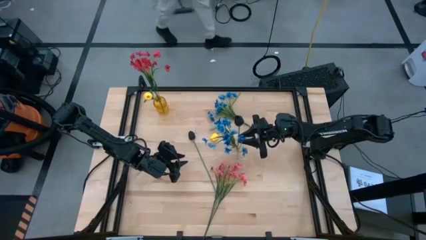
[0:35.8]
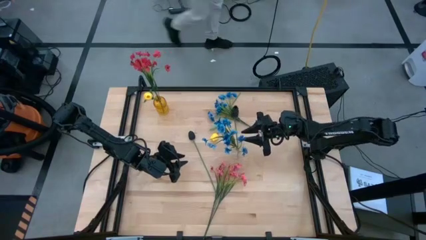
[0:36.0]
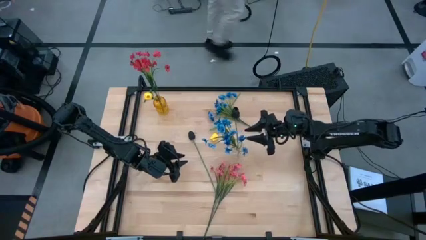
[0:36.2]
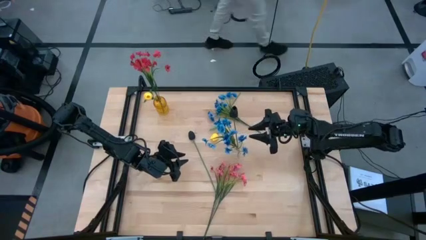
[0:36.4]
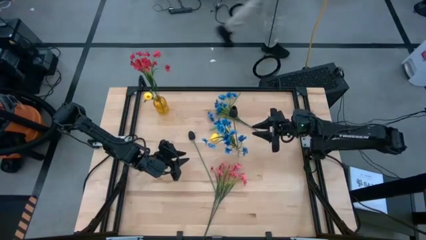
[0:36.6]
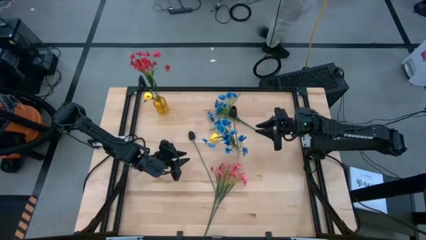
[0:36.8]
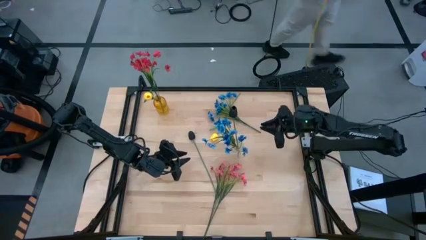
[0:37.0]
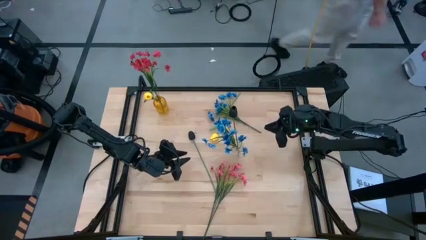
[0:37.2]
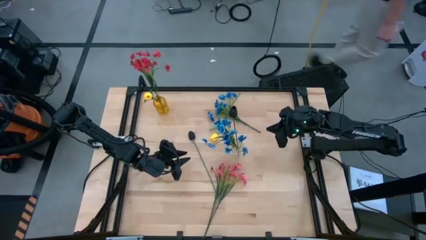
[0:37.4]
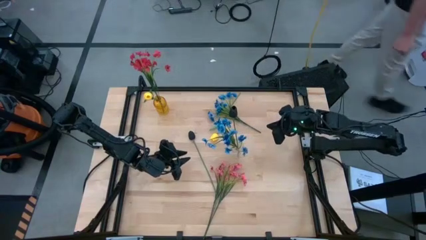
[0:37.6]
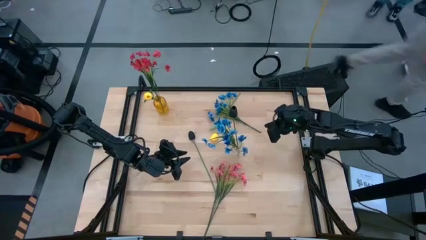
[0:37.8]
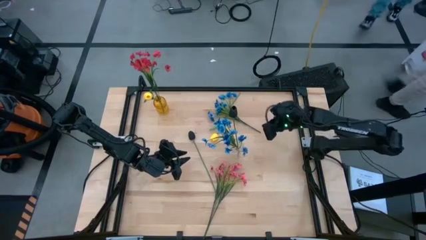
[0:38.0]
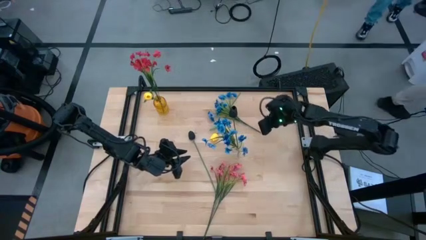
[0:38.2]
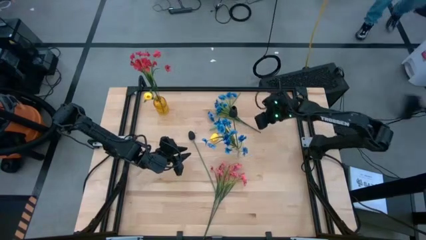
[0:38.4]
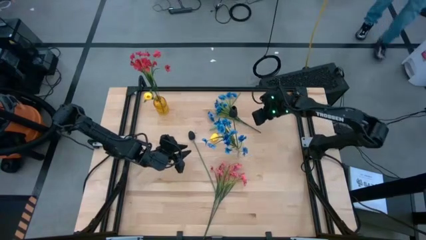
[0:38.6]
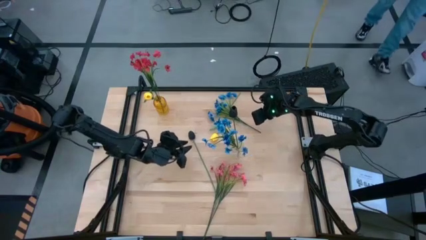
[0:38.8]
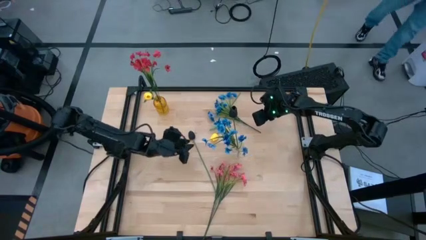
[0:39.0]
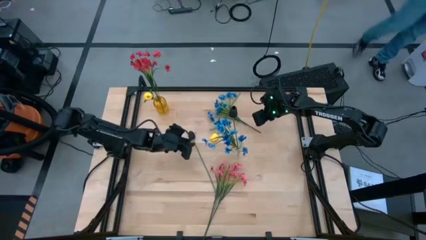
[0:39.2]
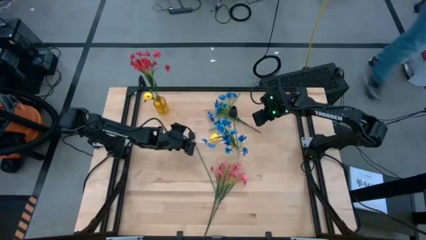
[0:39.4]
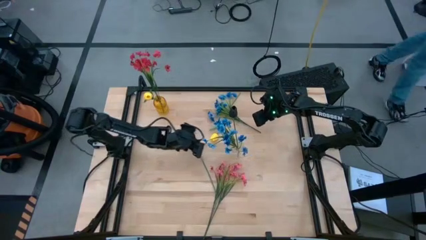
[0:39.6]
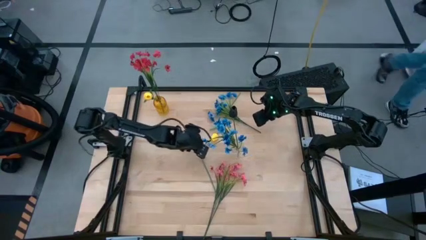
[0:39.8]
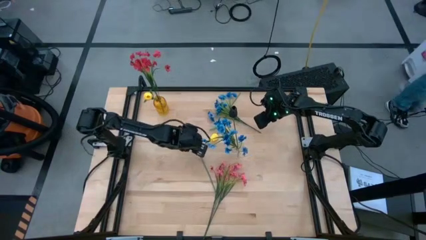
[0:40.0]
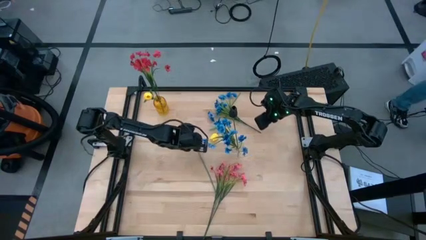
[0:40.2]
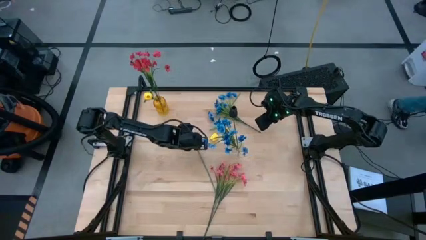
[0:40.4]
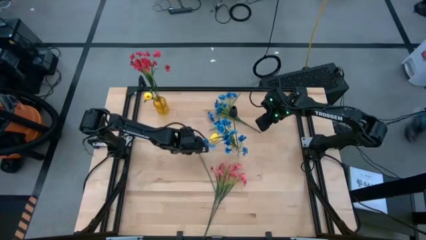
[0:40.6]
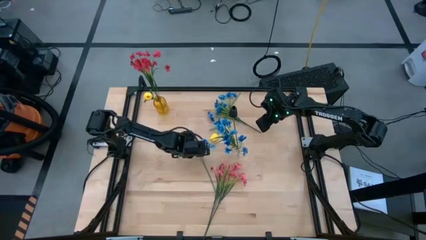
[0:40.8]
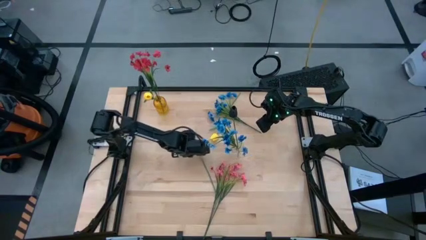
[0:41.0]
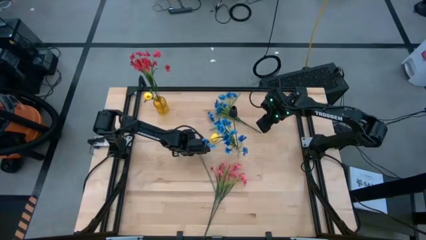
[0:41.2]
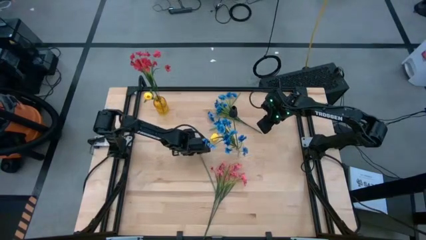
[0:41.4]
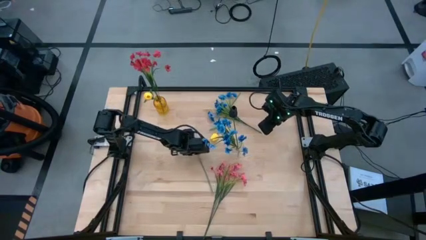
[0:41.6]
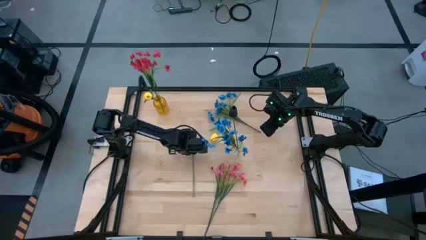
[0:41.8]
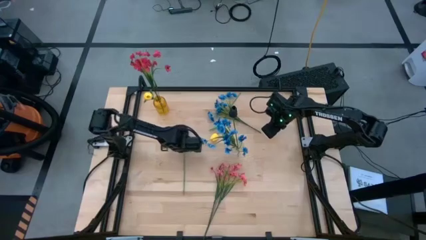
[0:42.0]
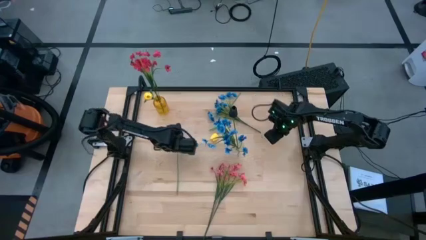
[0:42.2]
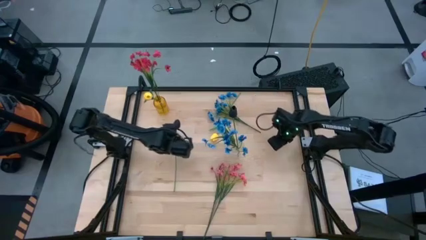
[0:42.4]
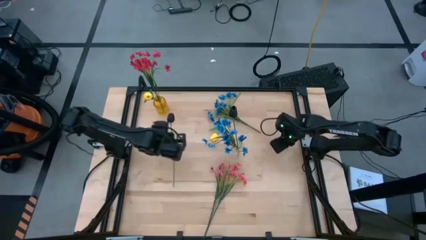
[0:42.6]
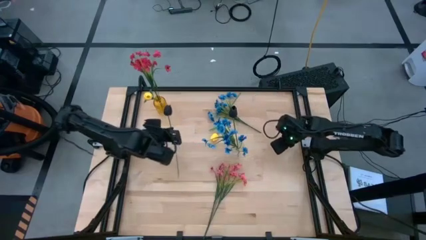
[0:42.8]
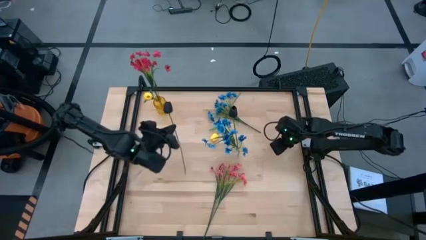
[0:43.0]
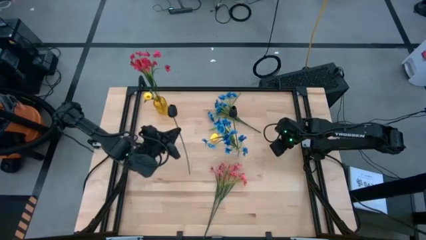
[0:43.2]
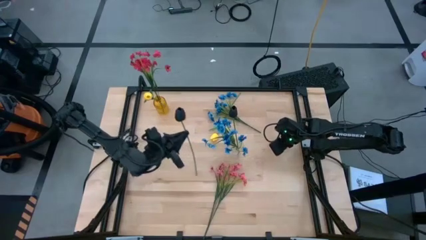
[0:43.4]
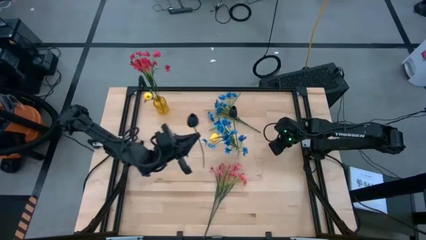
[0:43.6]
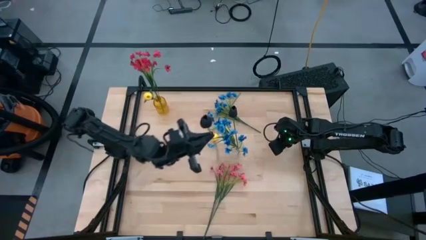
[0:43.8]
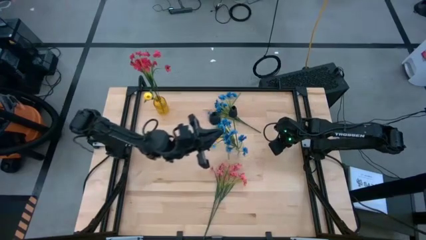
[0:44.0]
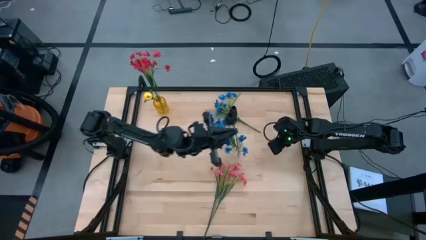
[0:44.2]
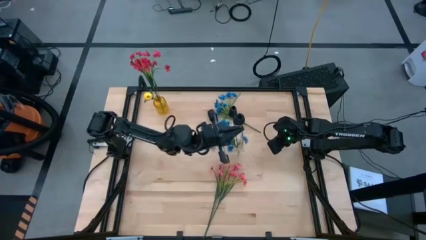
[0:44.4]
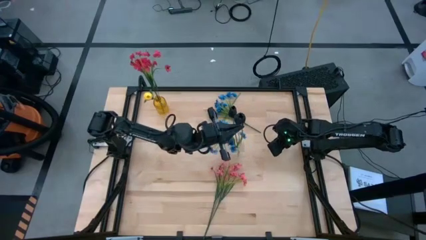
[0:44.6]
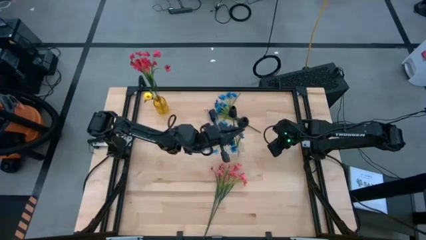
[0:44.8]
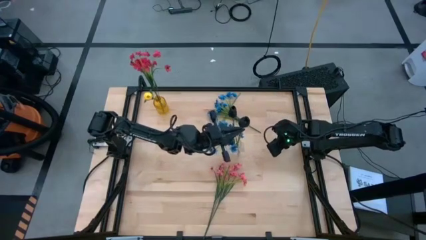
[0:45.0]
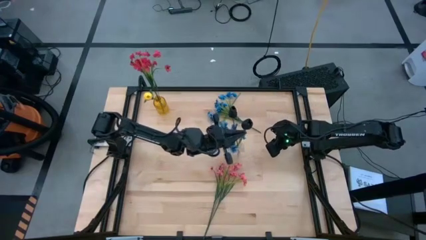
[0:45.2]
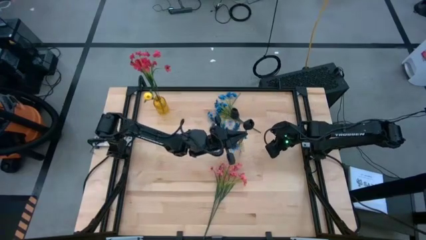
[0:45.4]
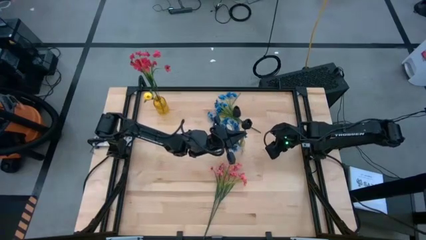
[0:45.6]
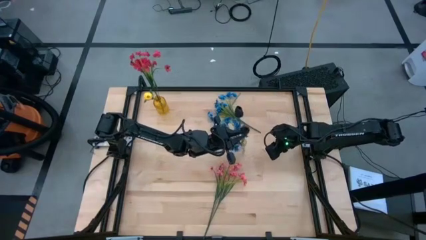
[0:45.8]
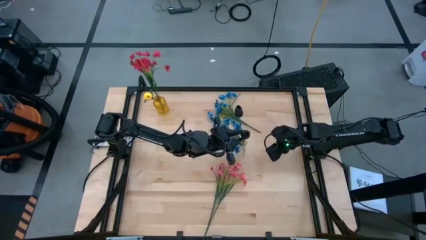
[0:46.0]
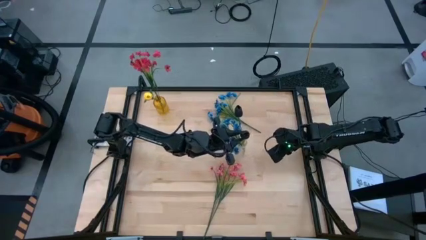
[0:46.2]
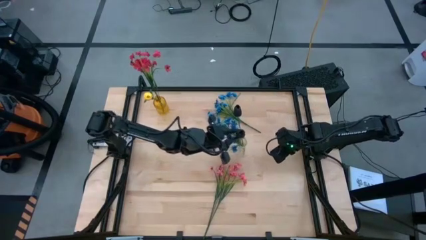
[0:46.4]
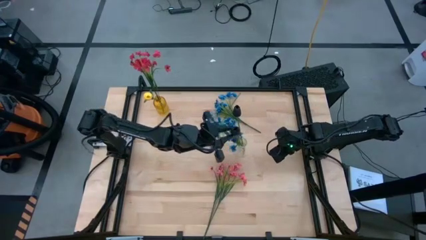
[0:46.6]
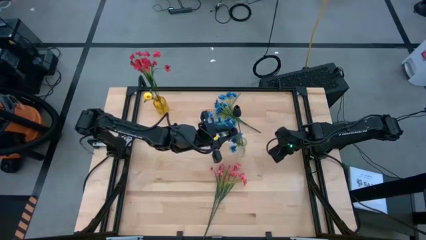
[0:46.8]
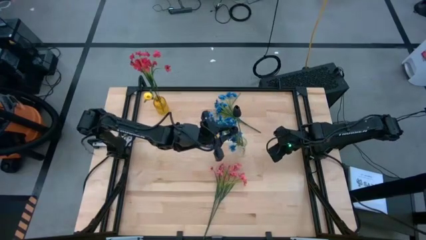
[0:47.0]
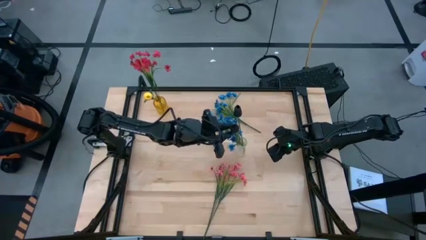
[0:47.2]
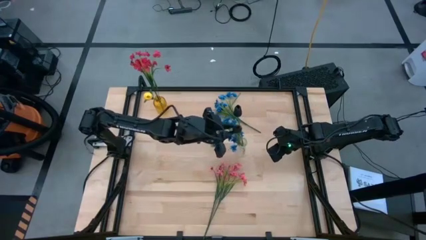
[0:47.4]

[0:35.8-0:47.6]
Task: Sort flowers into vase by color
Put the black tulip into the transparent vase

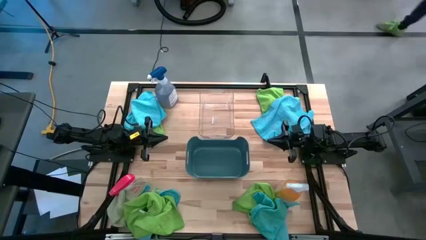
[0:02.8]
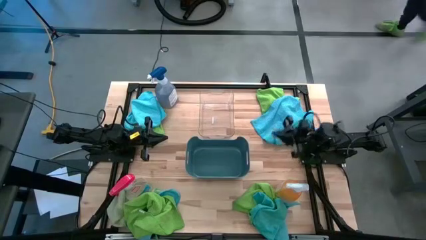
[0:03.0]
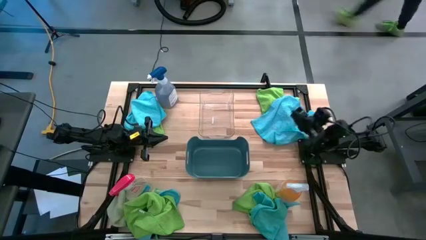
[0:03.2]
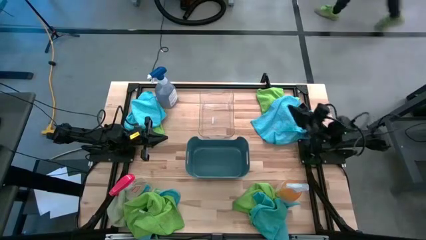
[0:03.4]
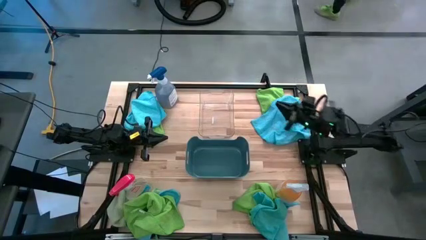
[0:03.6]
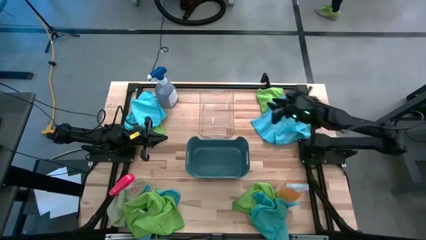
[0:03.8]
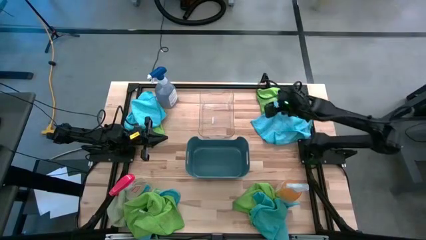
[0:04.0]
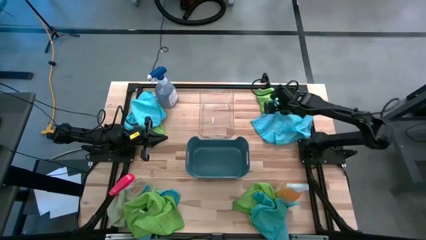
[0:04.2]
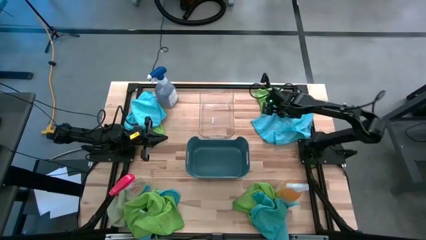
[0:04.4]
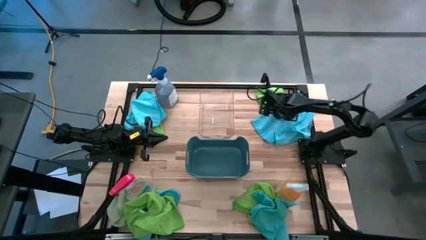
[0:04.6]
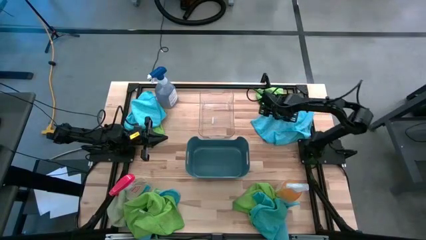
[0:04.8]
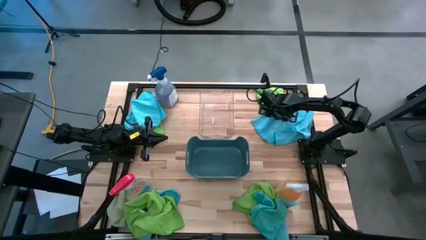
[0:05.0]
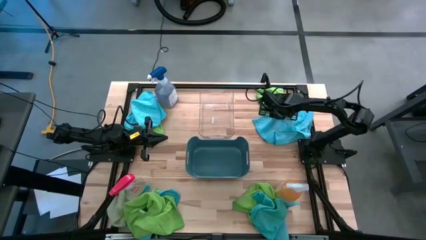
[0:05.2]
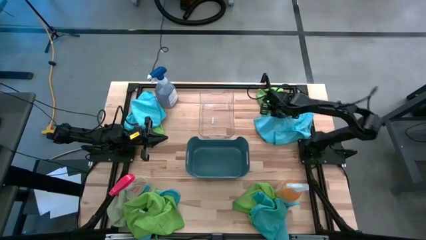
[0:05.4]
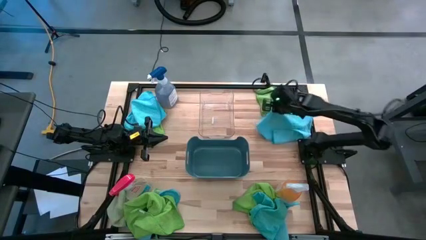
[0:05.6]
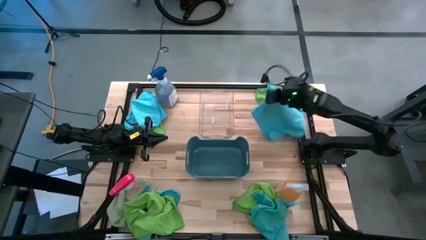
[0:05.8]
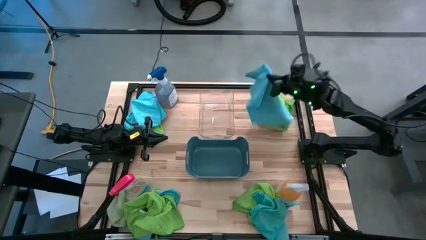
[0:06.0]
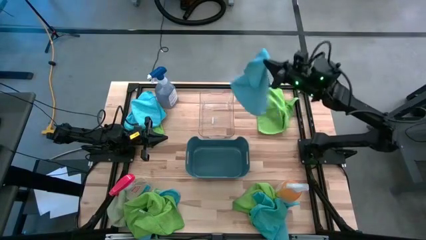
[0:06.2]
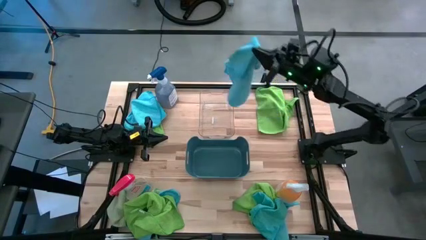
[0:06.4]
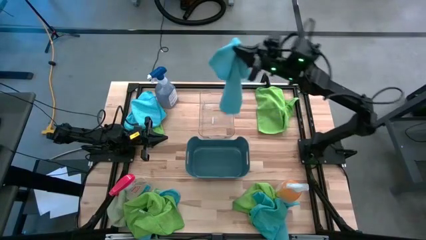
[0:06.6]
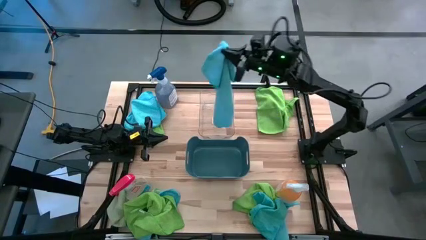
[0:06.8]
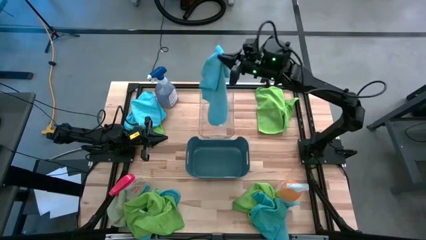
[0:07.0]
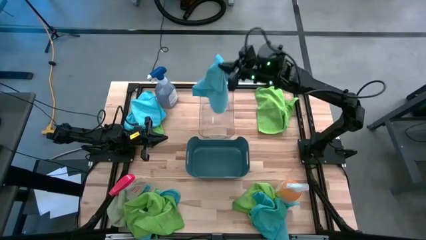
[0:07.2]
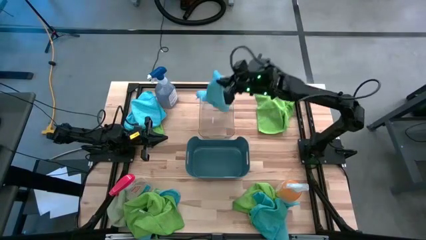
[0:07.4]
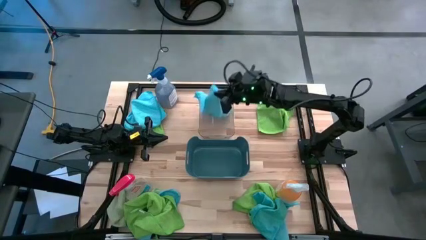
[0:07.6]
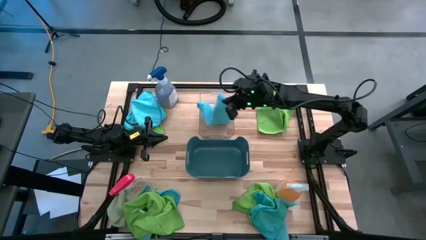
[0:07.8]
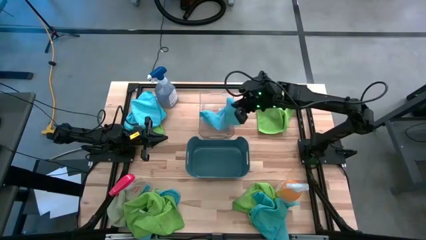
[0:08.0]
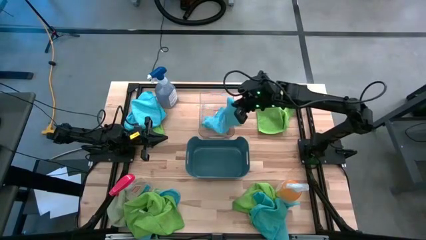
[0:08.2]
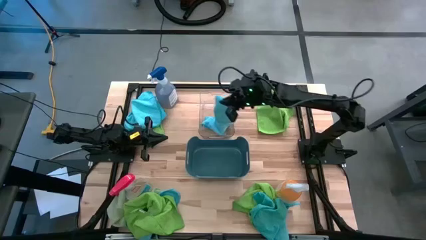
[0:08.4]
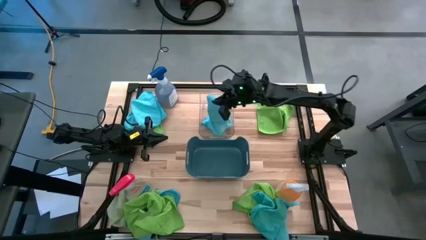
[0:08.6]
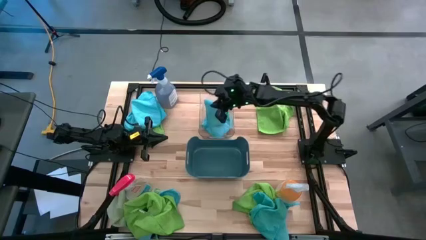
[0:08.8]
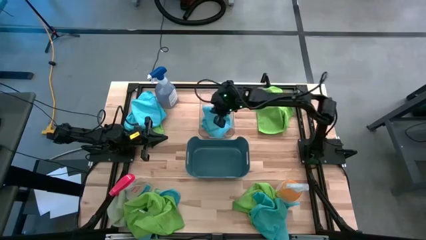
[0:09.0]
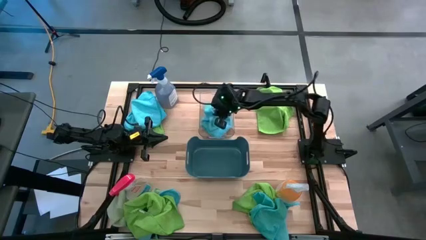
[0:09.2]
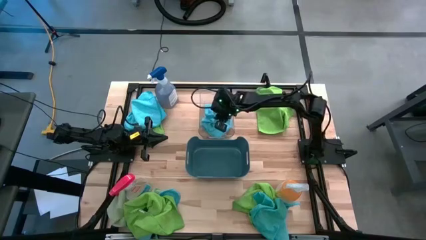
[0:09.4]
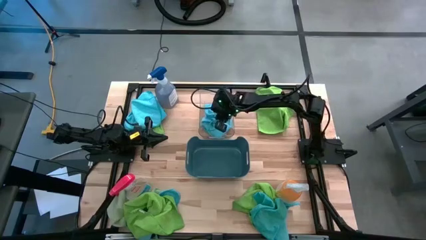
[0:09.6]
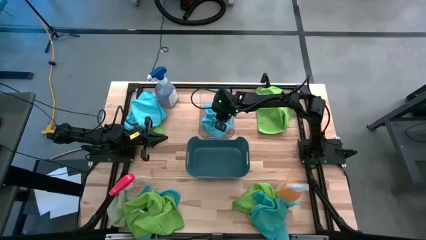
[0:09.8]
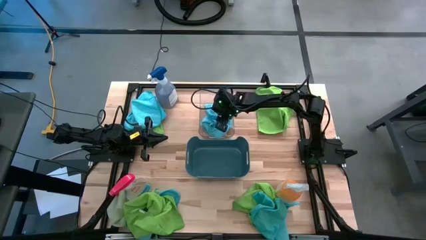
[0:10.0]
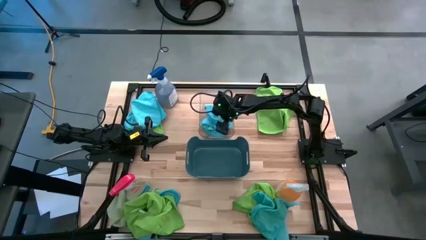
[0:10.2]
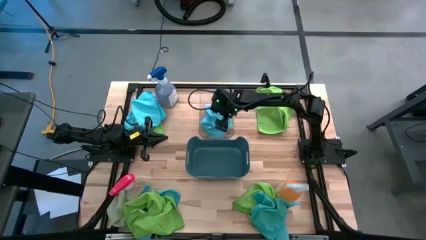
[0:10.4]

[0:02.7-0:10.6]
Task: Sort microfiber towel by color & place in baskets
Put the blue microfiber towel into the transparent bin
